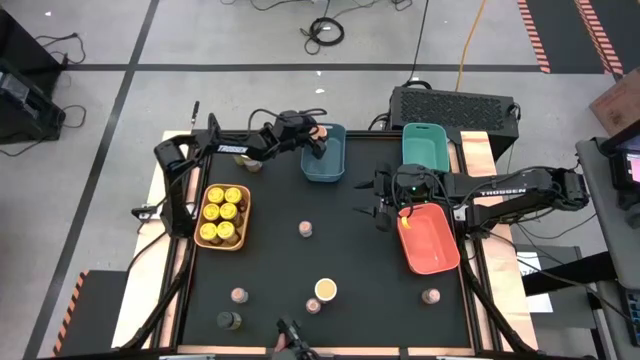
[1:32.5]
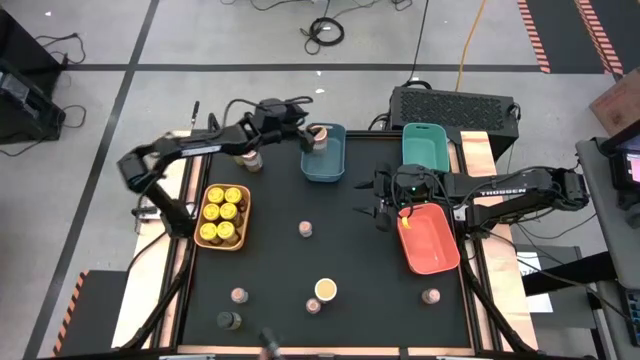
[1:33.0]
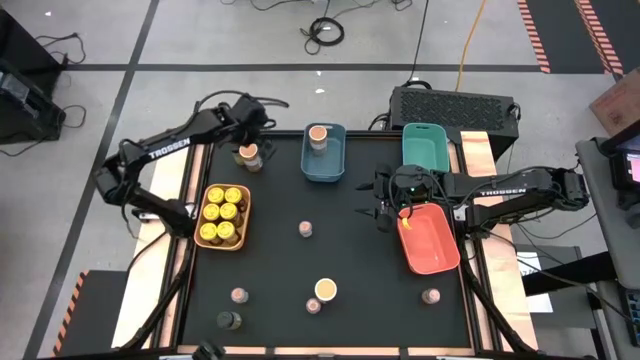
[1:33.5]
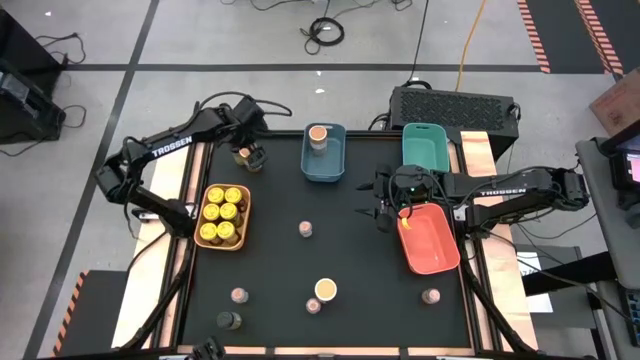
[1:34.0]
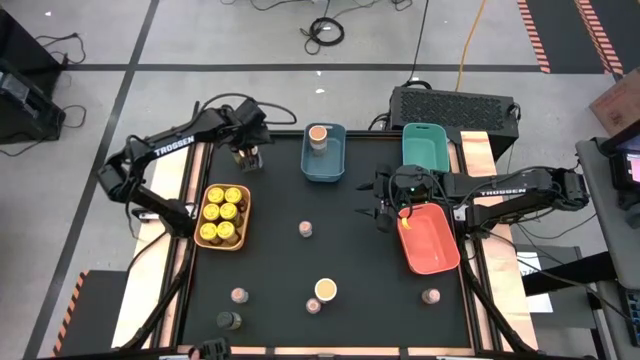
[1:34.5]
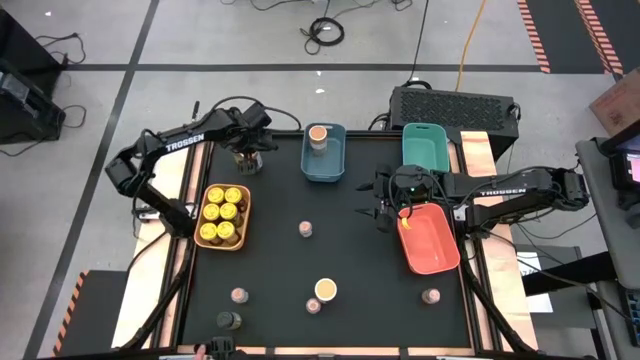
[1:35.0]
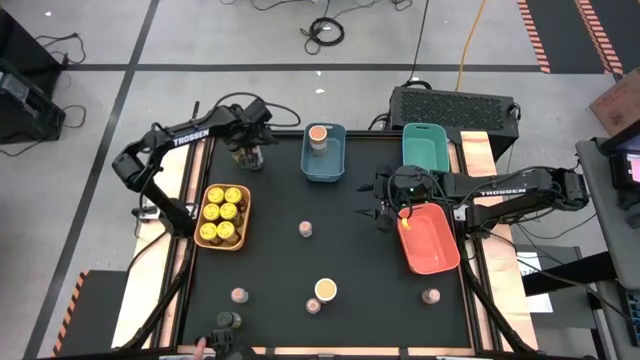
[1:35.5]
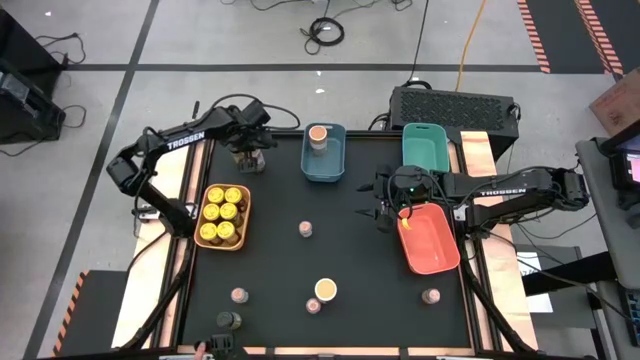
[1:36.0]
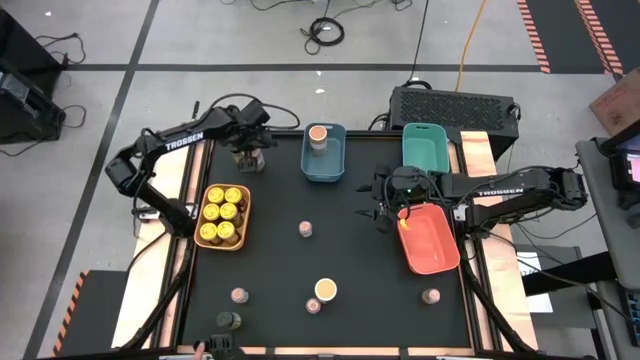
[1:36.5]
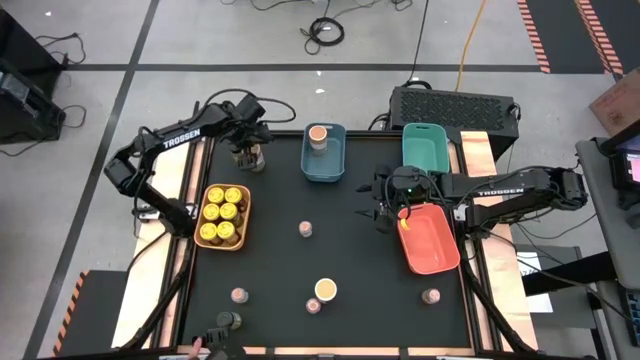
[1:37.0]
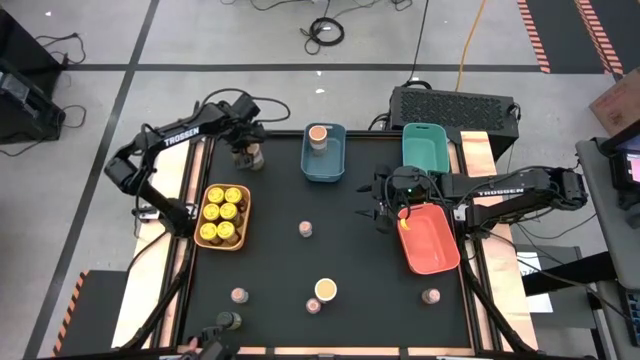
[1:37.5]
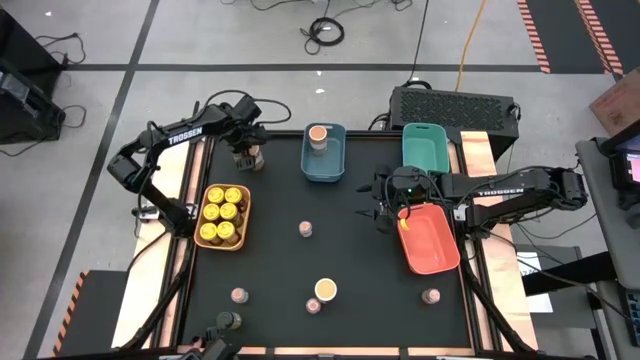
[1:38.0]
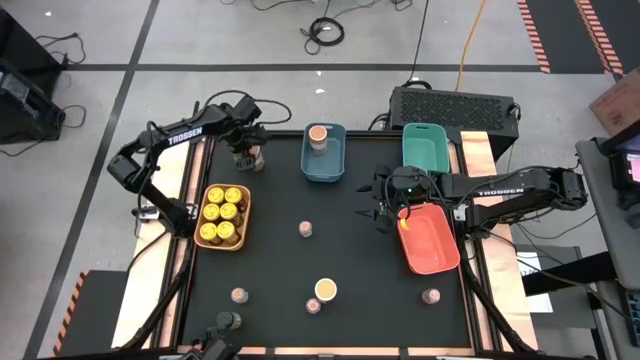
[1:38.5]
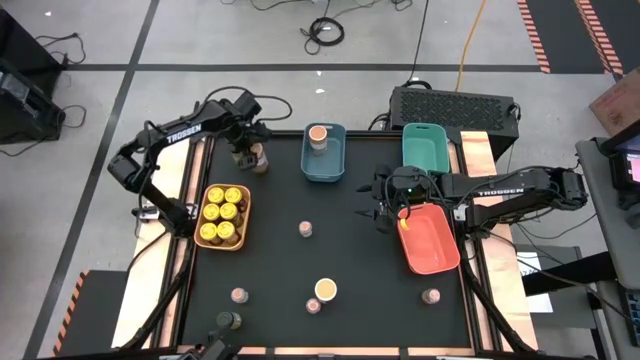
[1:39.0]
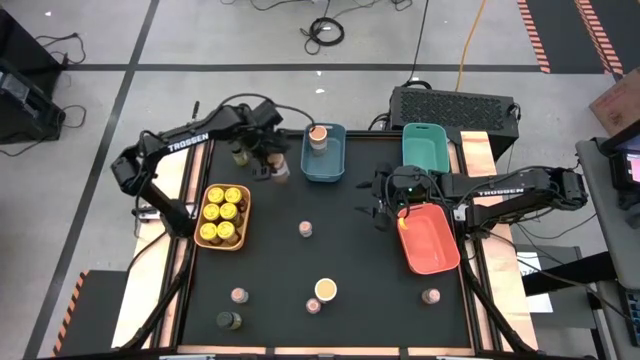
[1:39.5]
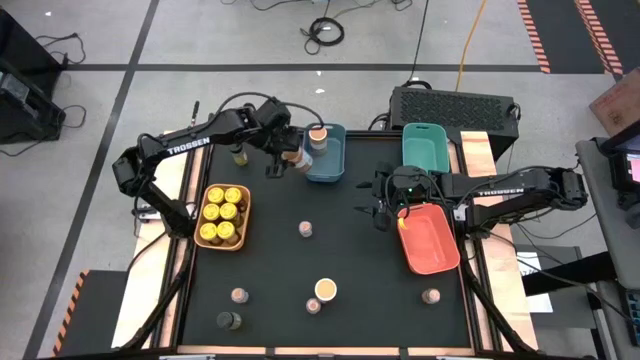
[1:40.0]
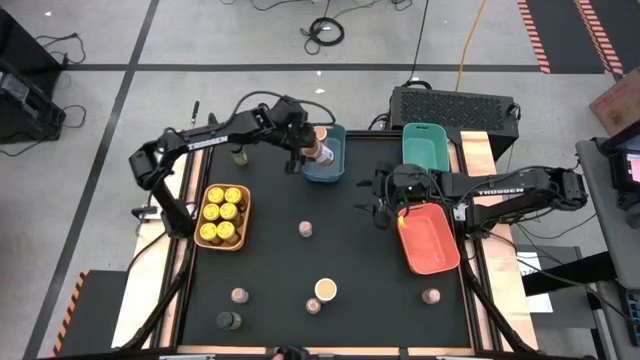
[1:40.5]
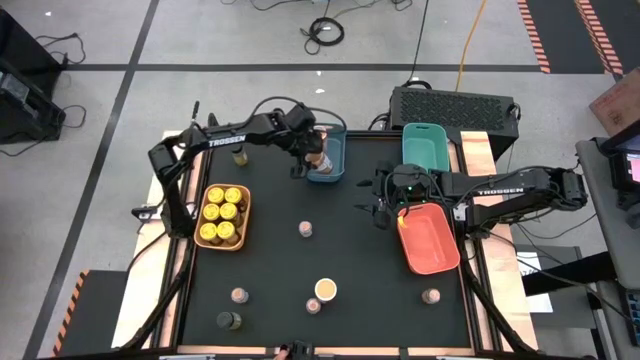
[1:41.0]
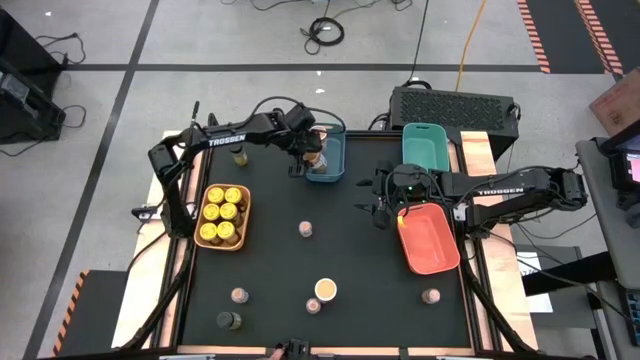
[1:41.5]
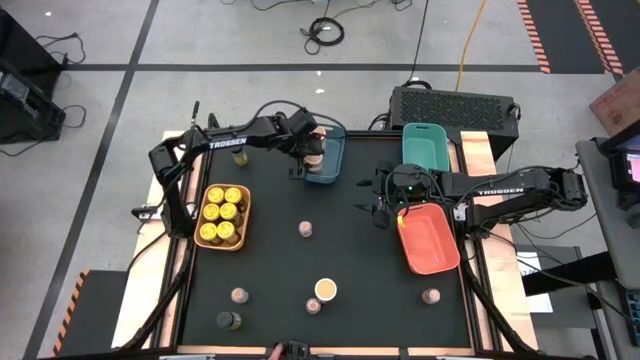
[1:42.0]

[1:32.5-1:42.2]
Task: Sort spices by type
Put the large brown seasoning bottle into the blue bin

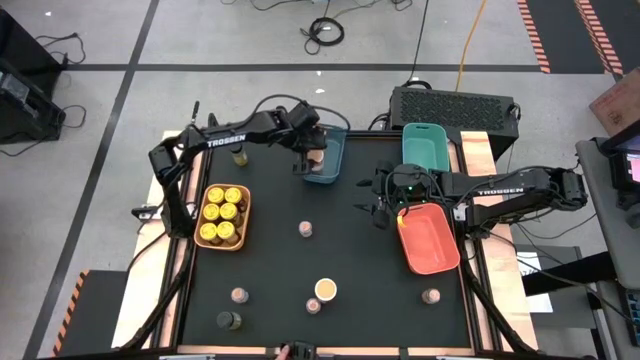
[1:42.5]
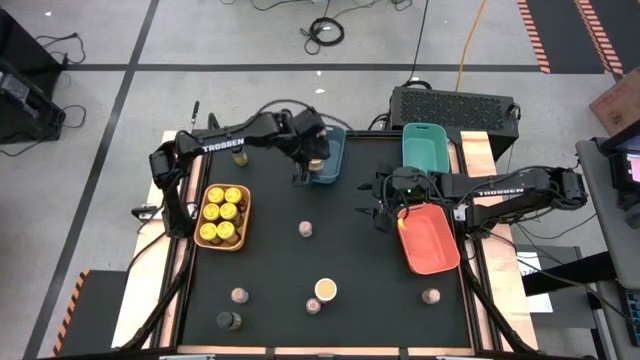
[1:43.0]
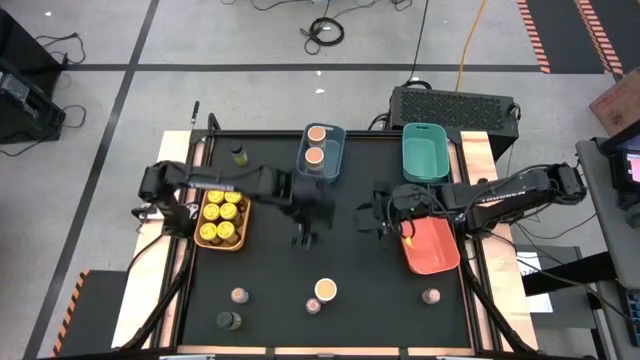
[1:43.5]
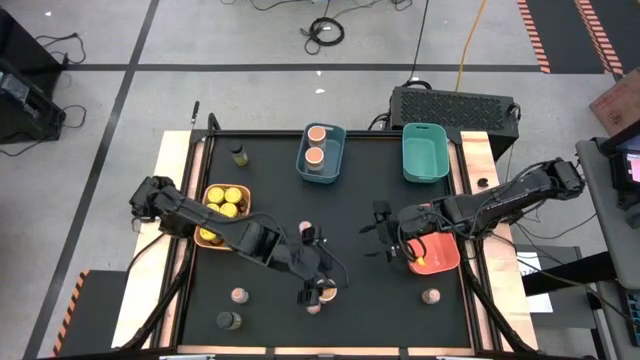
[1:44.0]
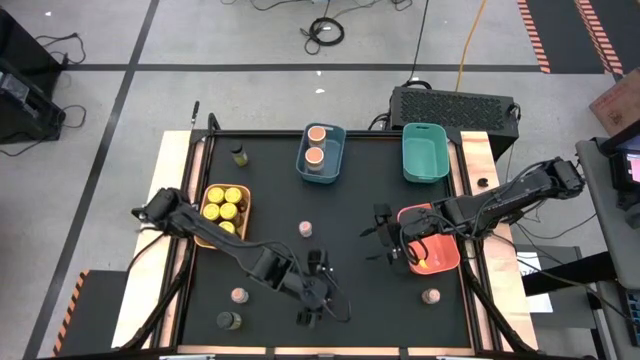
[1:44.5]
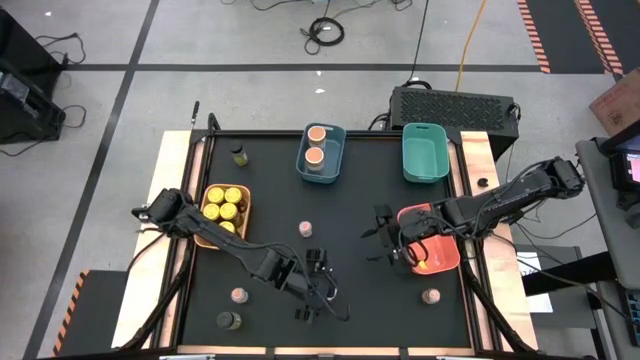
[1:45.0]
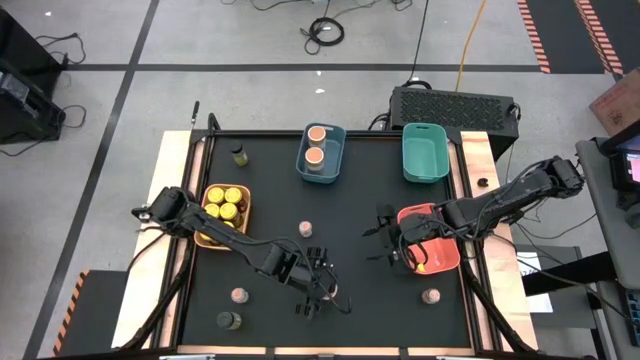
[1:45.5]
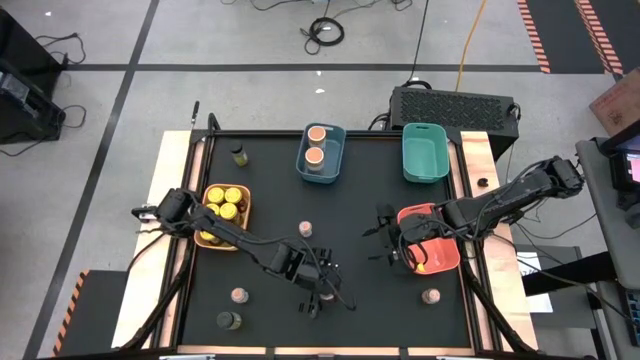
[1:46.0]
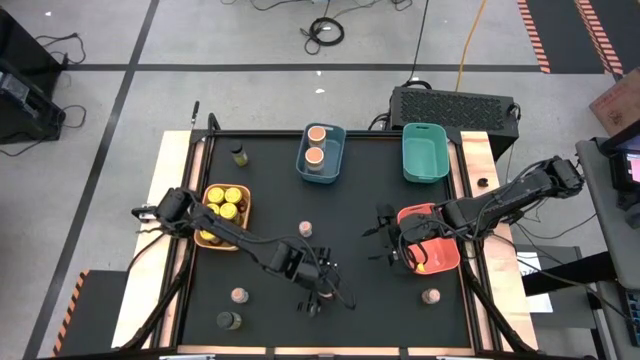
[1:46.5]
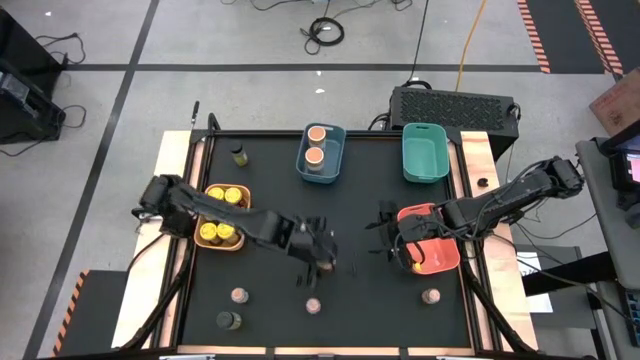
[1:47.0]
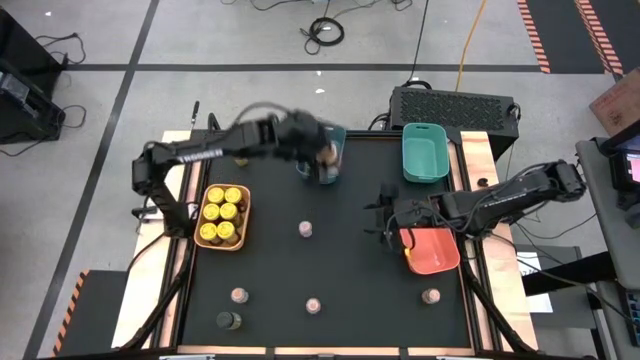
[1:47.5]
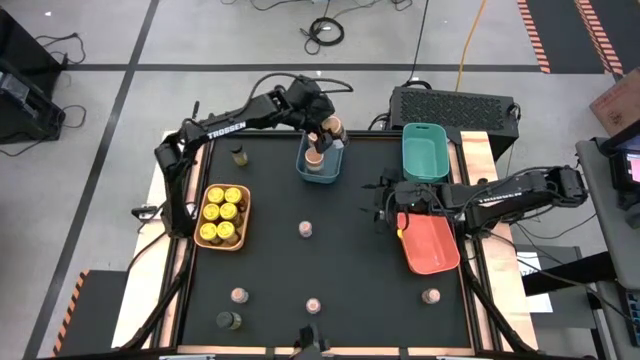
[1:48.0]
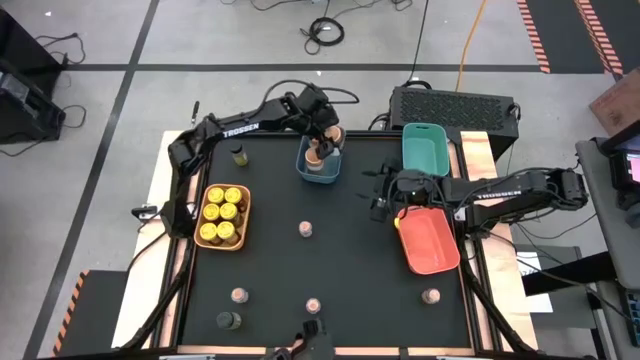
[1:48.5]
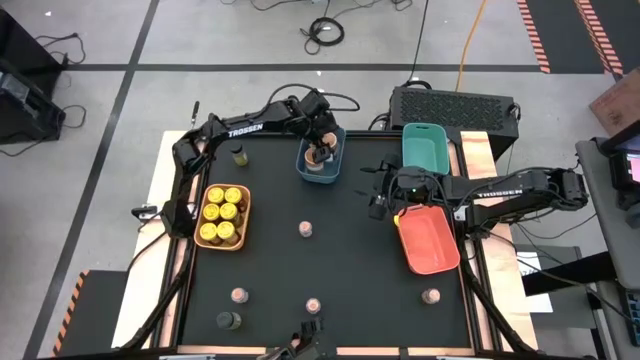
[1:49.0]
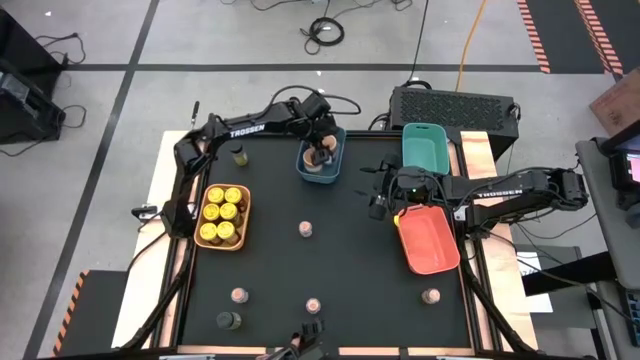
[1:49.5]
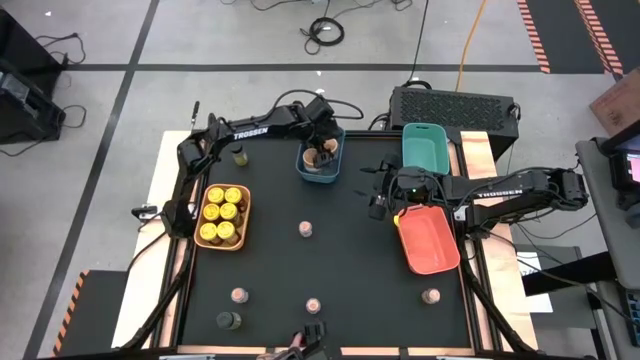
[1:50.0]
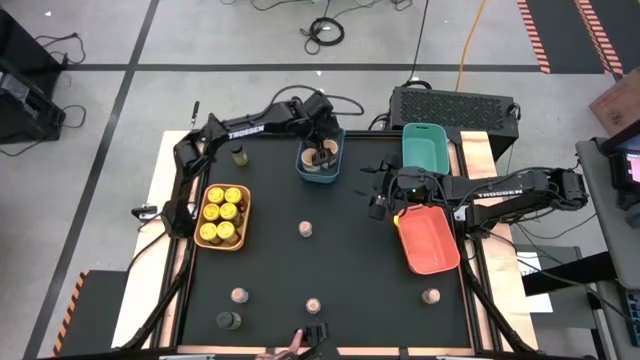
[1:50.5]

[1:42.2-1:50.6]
Put the large brown seasoning bottle into the blue bin

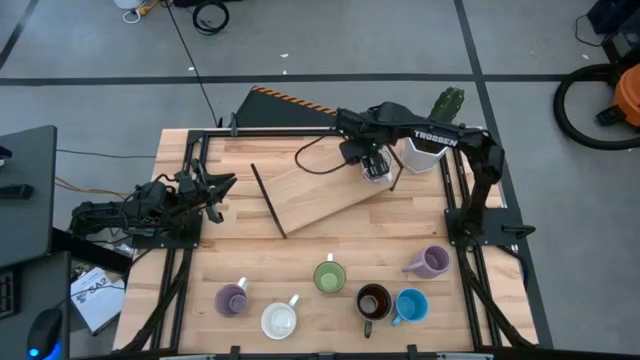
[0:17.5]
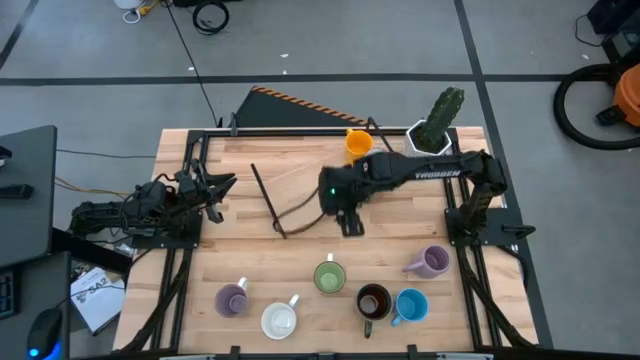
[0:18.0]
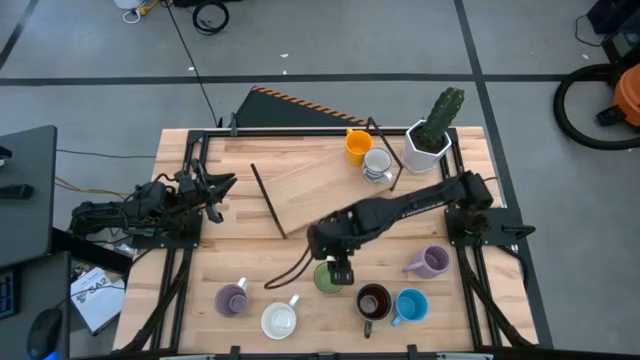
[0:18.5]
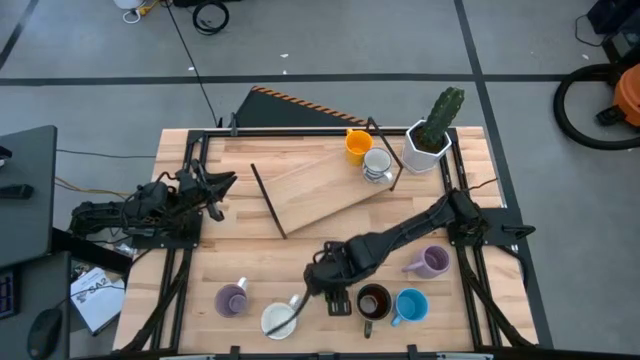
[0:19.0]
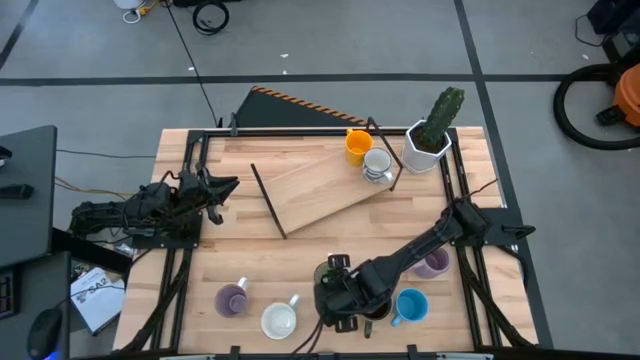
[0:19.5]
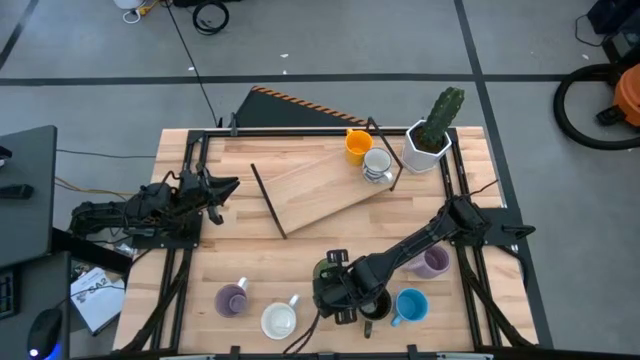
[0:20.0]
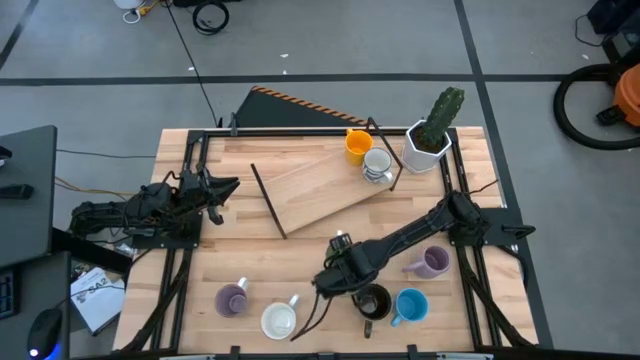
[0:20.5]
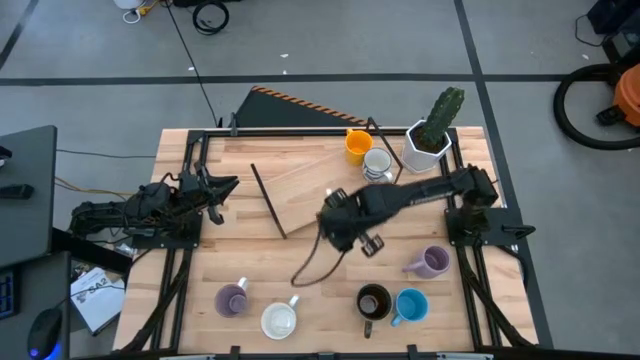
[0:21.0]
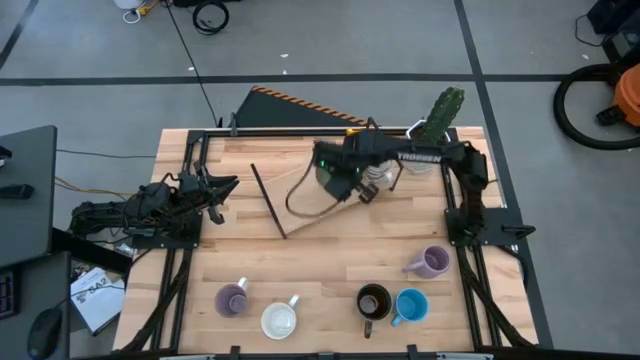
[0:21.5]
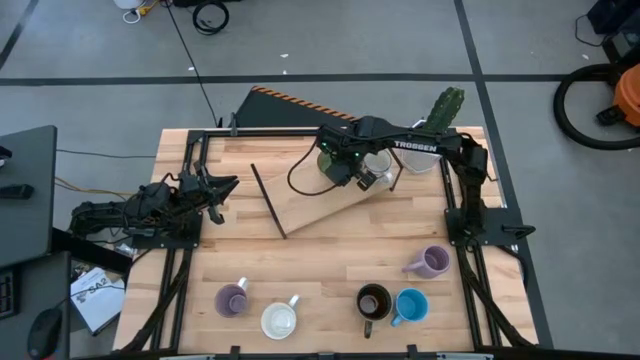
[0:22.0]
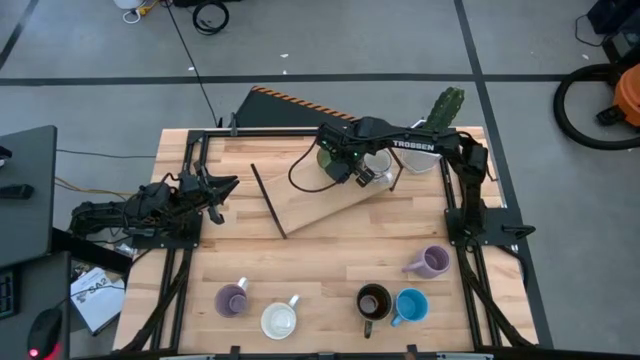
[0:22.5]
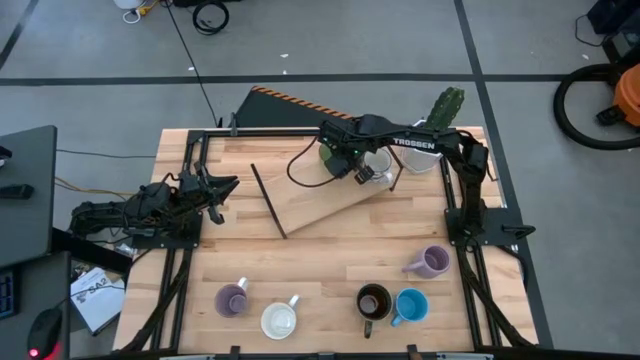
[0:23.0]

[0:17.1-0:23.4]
Task: Place coffee mugs
Put the green mug on the shelf
